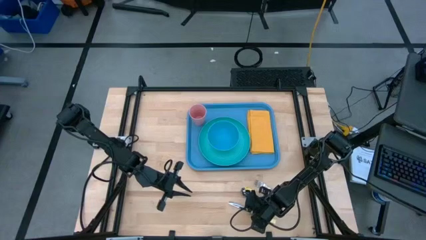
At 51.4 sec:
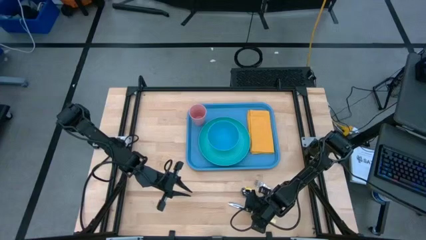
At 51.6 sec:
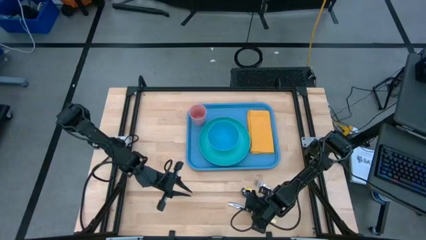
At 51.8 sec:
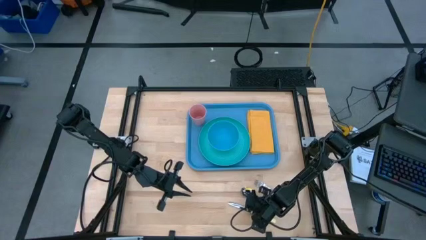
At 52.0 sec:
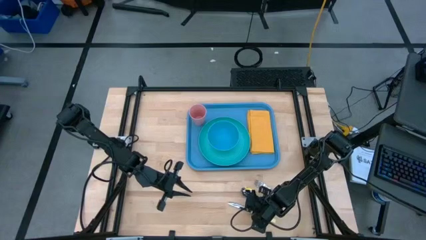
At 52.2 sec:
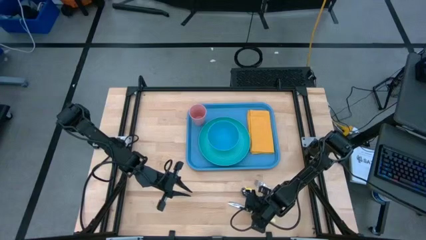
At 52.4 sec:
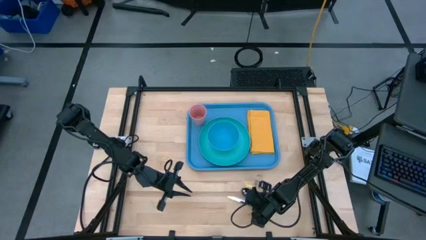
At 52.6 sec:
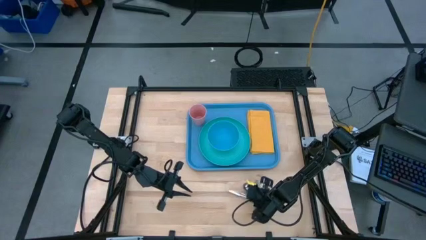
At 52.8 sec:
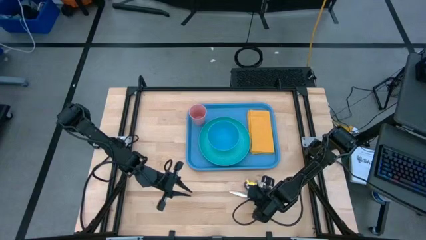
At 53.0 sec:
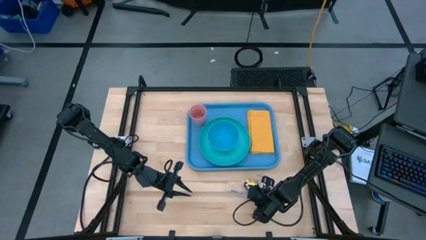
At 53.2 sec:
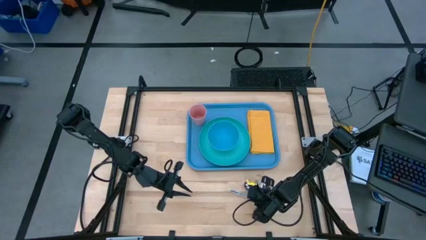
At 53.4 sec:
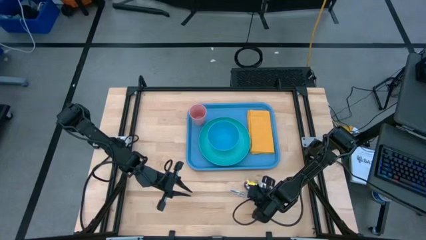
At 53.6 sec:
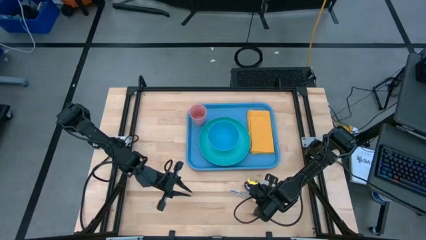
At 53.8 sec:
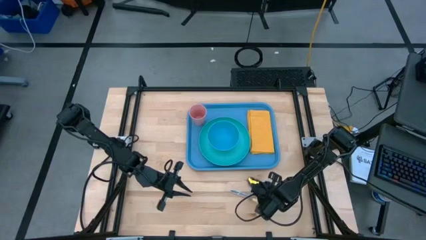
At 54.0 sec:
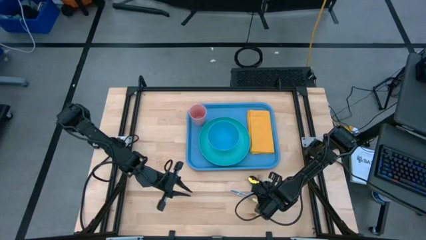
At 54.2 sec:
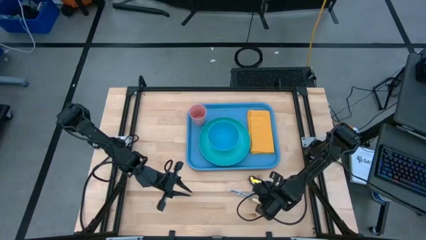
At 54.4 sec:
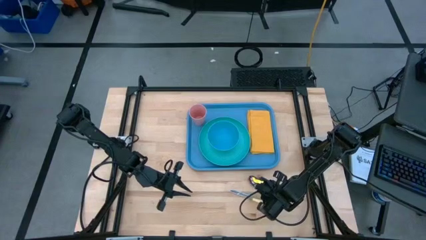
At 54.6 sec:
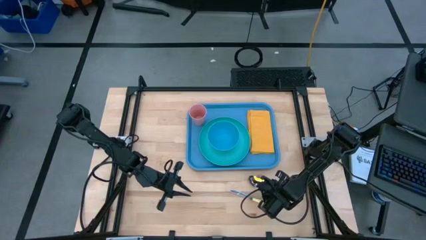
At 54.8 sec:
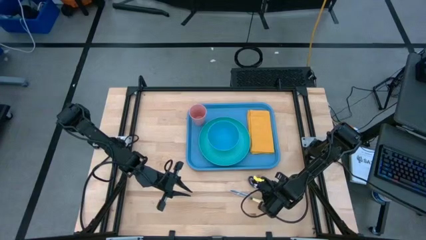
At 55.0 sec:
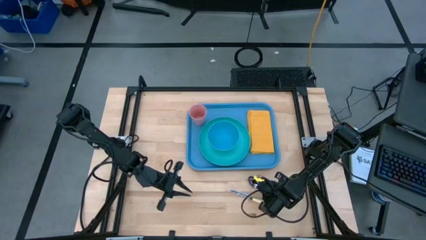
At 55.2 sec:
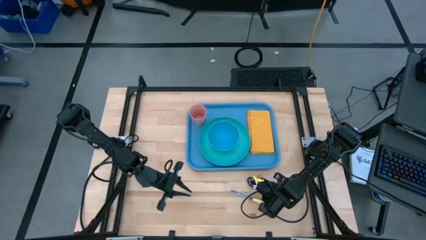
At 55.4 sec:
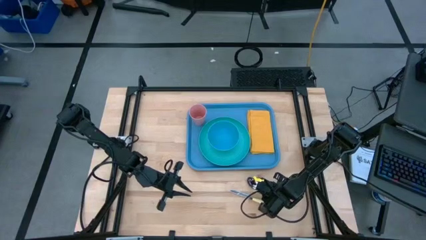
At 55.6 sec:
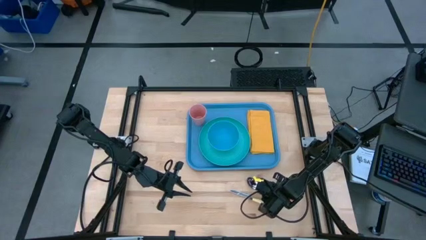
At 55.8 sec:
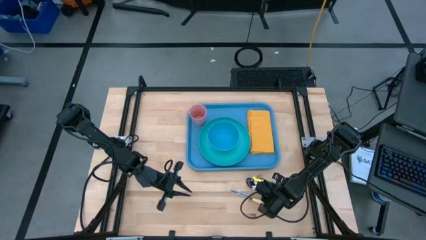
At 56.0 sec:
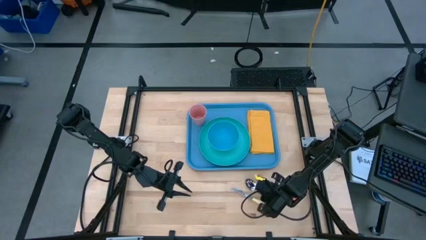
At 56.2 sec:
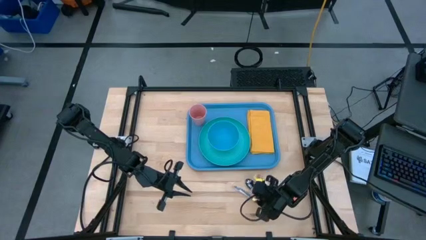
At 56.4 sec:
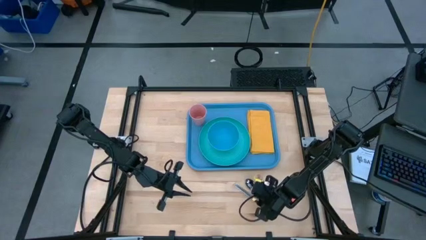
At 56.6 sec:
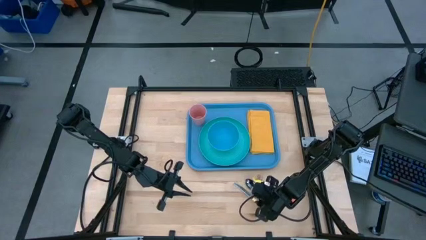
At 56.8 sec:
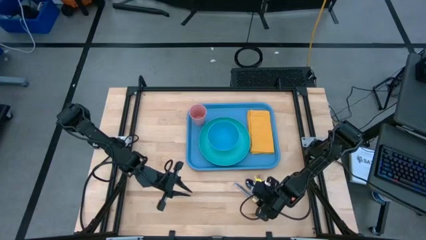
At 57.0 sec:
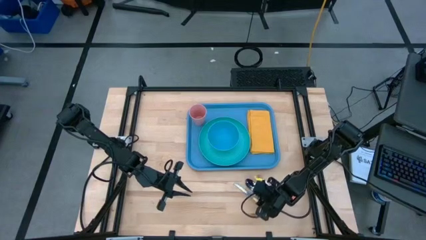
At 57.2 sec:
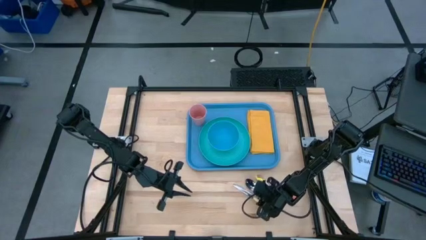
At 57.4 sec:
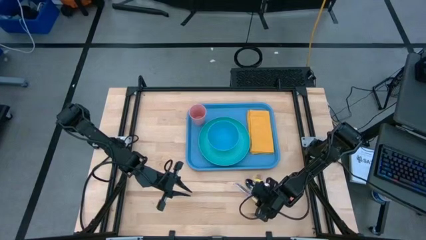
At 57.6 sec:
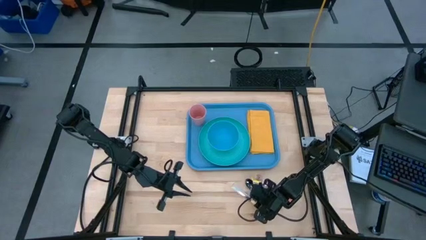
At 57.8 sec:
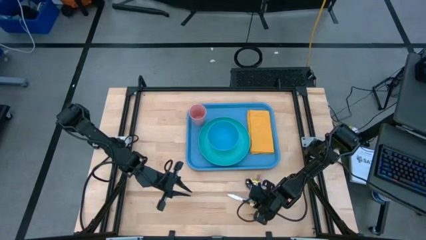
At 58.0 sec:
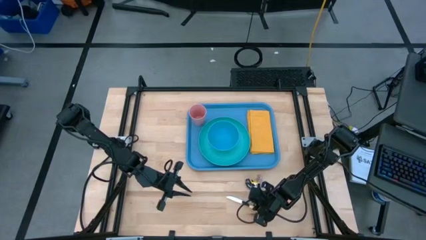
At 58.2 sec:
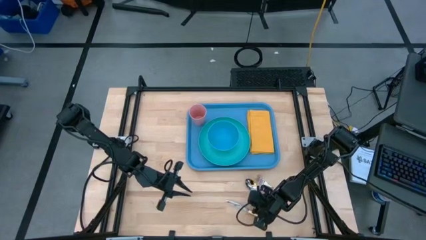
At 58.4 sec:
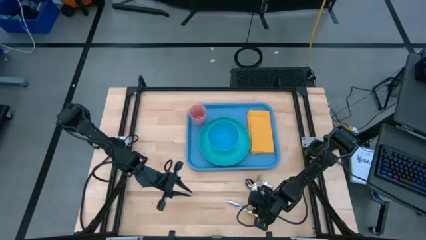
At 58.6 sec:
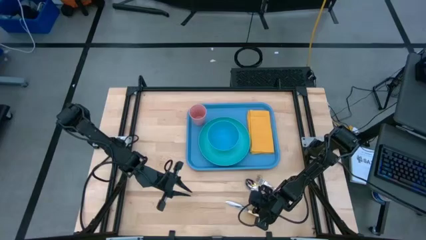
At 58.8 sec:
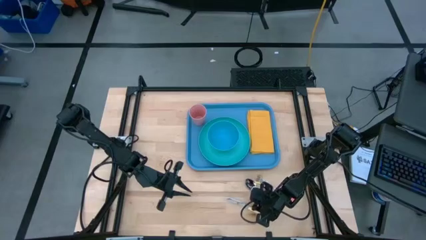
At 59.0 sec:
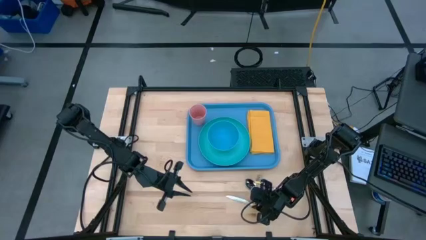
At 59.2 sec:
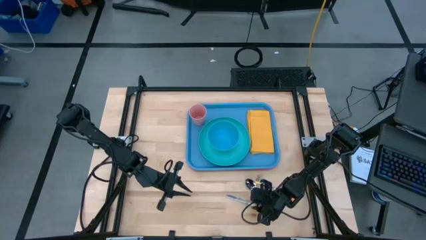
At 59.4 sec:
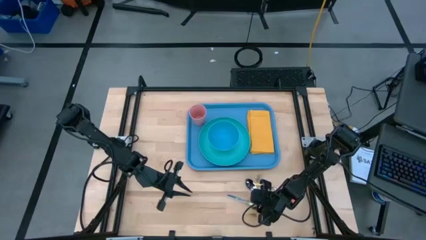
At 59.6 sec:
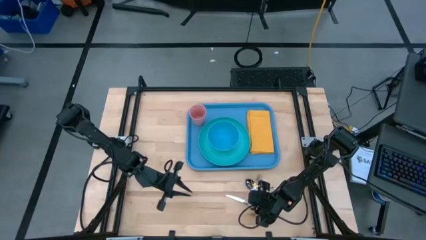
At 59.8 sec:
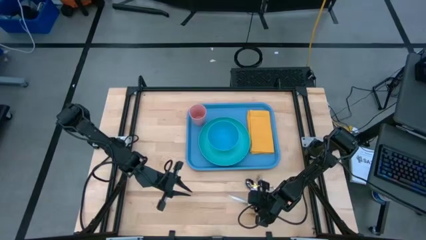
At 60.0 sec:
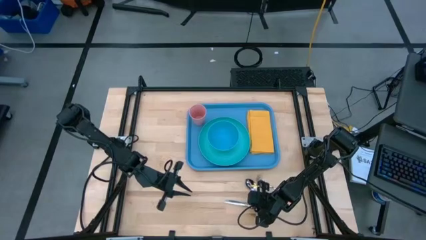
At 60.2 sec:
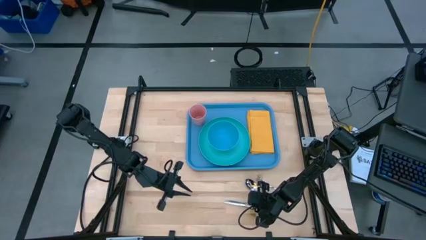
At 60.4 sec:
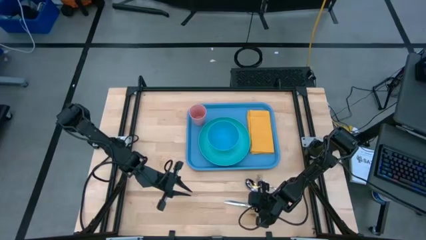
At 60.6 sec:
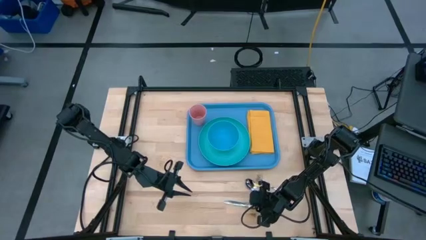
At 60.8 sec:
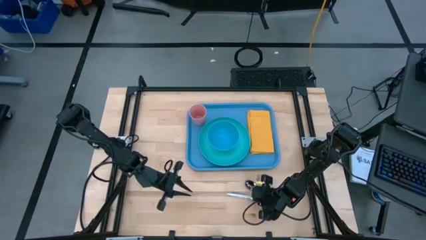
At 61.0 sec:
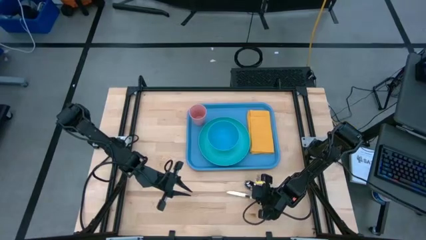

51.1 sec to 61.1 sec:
Task: Set up tray
Put the yellow knife on top of the yellow napkin

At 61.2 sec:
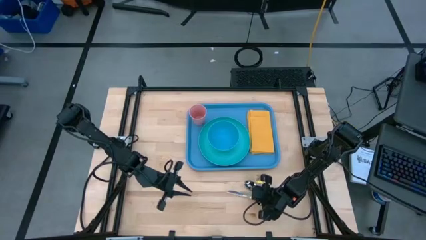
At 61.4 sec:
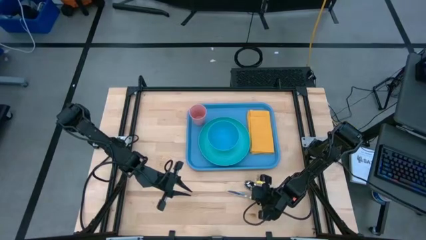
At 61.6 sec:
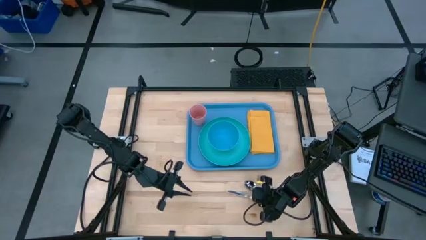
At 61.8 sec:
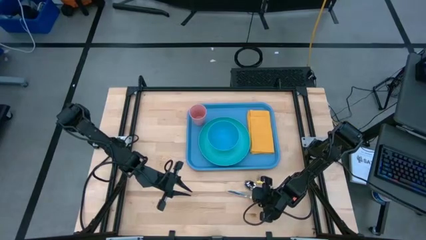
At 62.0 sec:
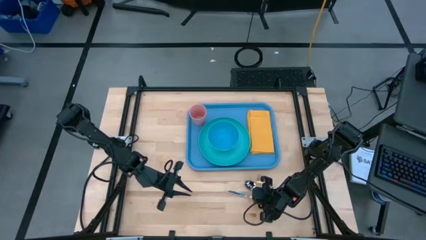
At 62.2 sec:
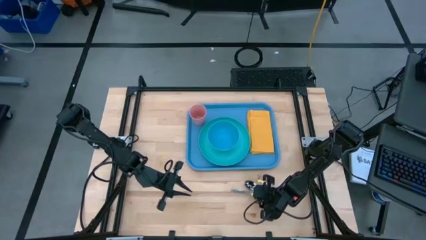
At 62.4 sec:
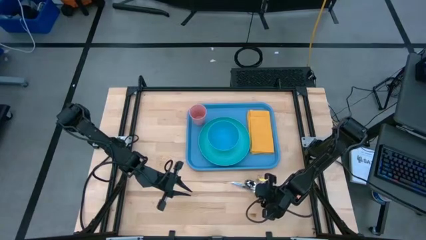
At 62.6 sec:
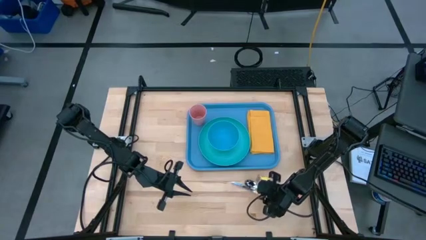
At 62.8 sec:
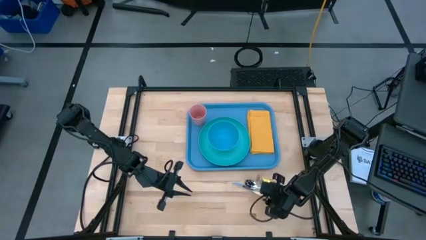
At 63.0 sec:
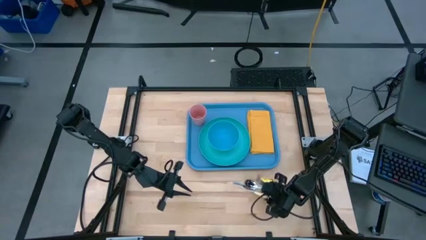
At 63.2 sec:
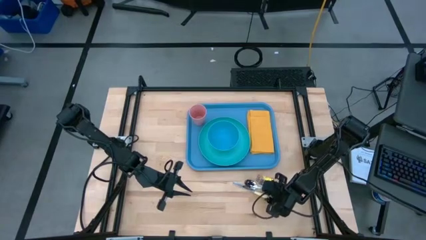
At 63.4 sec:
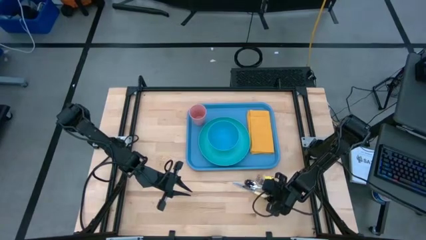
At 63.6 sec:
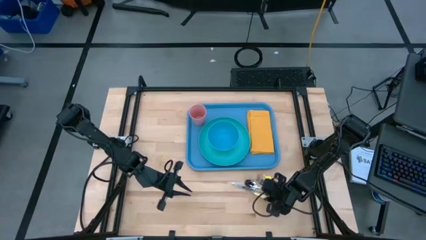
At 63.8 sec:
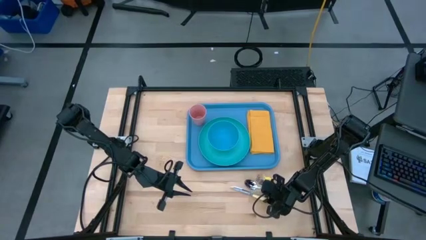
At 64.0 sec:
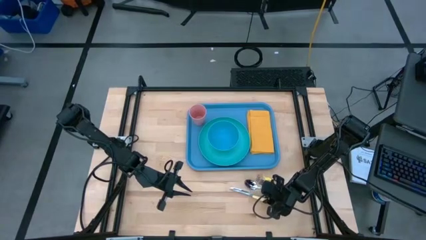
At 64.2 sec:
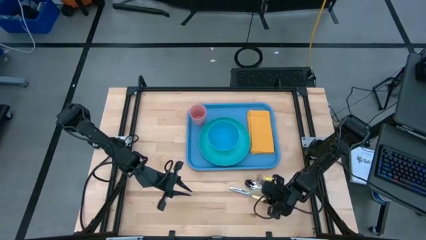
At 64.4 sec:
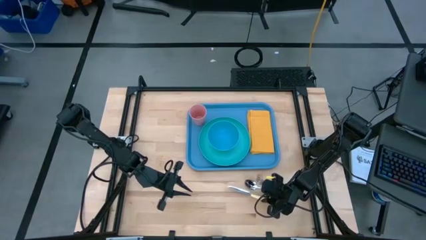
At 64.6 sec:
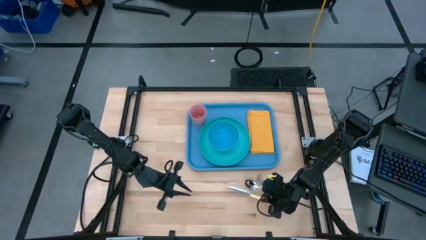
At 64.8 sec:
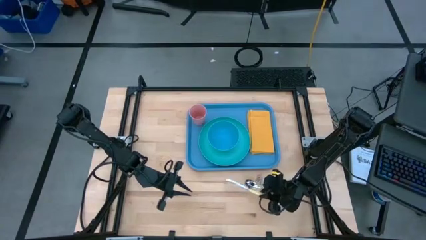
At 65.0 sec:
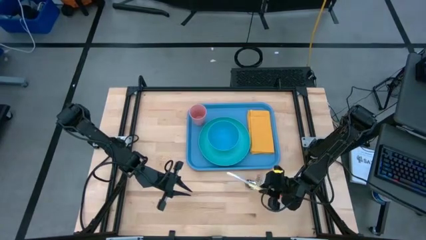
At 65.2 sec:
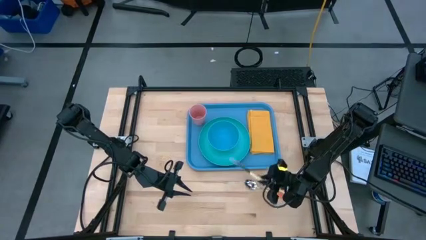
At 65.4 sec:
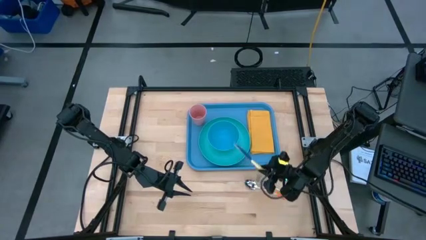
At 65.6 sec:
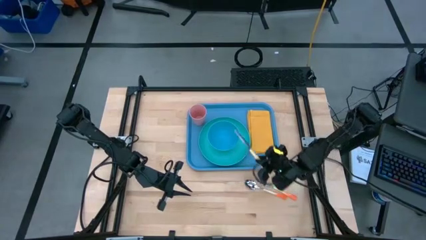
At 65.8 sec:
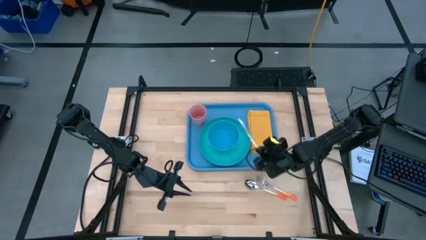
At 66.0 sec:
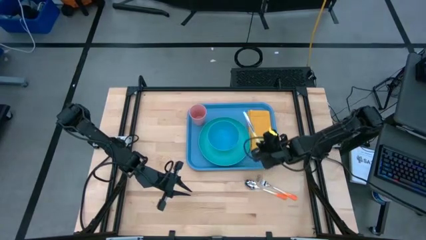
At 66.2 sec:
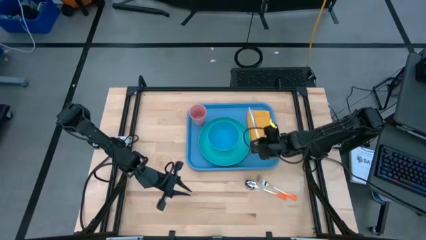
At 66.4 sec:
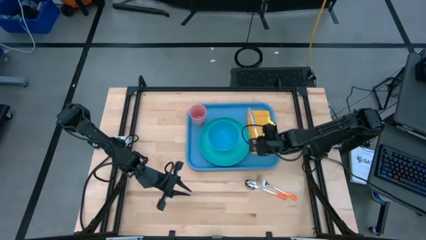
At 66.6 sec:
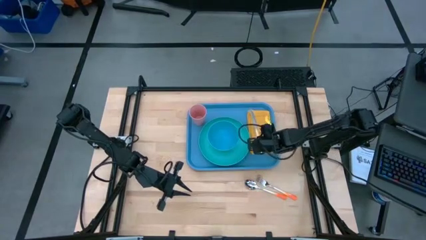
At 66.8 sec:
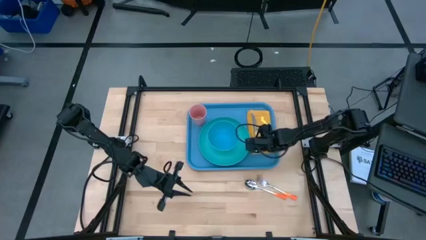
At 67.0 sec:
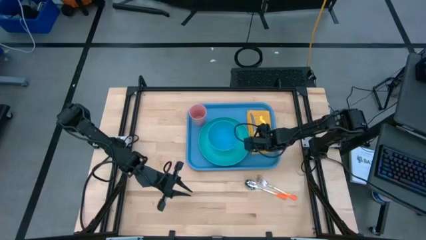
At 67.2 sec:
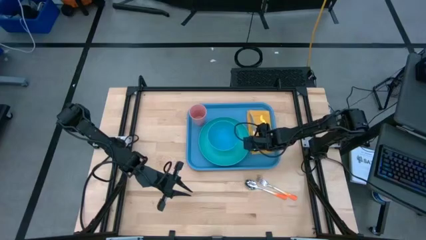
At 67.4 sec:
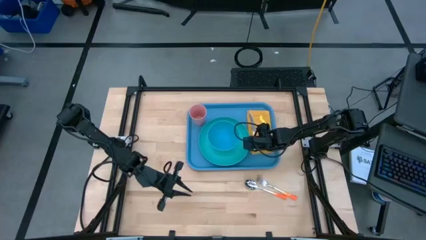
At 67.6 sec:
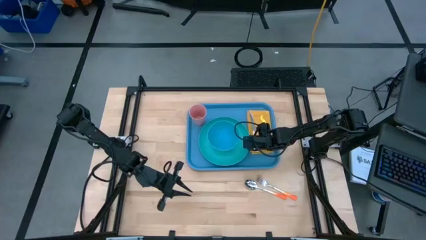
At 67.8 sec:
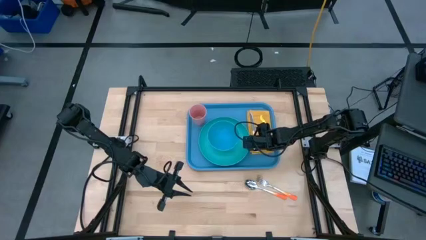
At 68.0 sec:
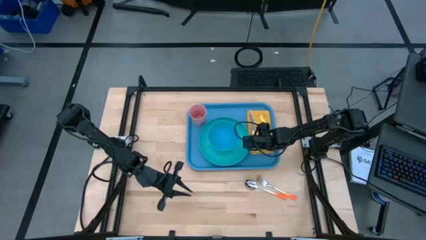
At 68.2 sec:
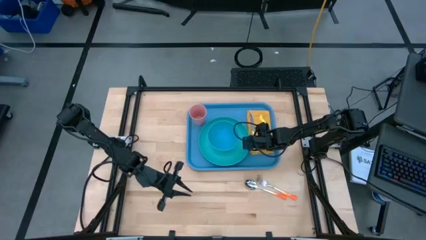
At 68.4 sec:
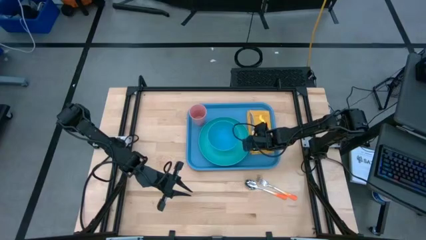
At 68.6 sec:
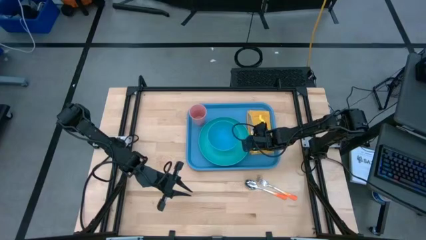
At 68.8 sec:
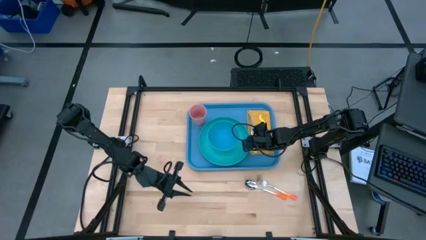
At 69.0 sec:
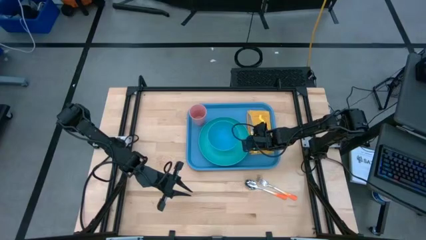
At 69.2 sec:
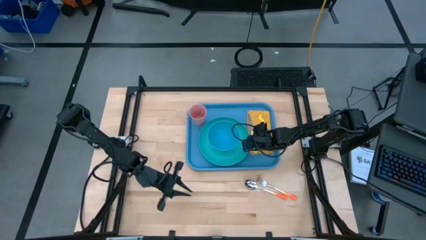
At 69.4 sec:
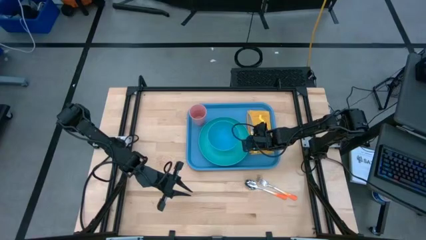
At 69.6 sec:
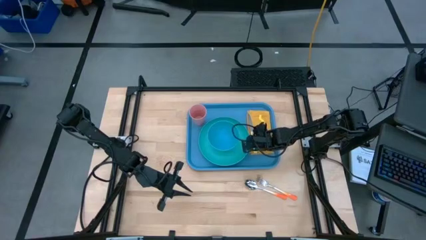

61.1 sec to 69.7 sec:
Put the yellow knife on top of the yellow napkin
